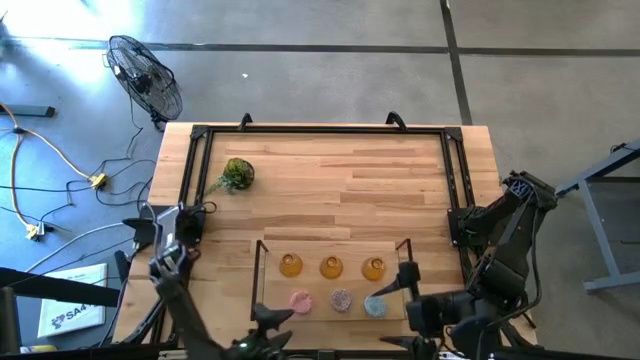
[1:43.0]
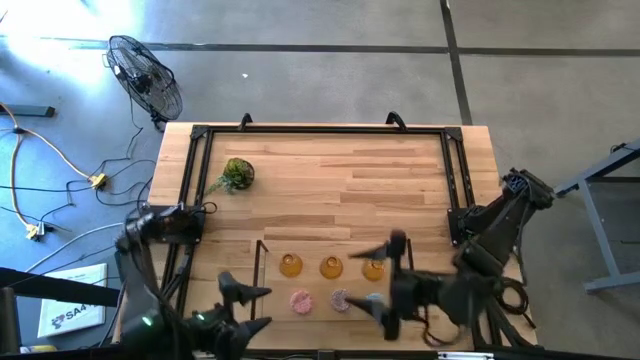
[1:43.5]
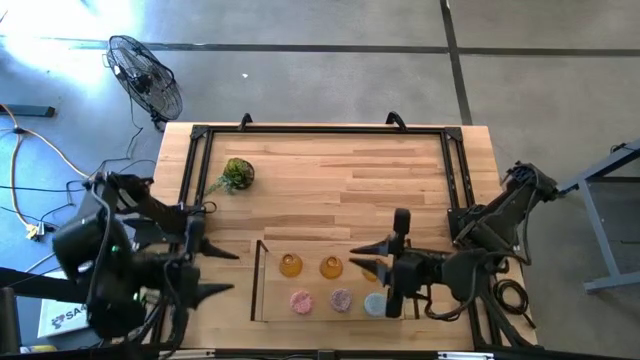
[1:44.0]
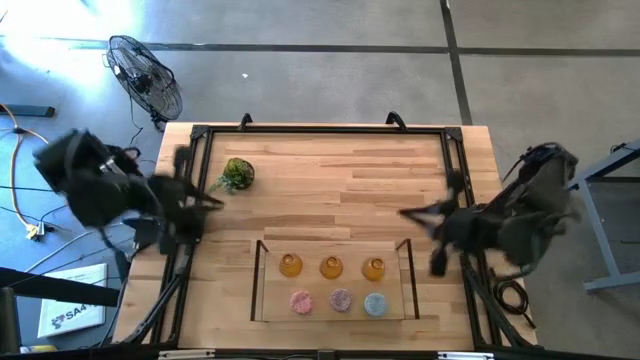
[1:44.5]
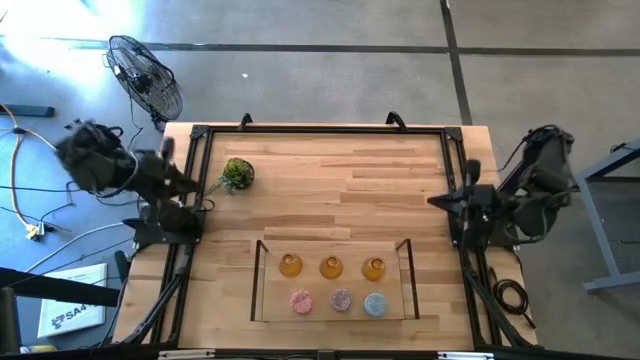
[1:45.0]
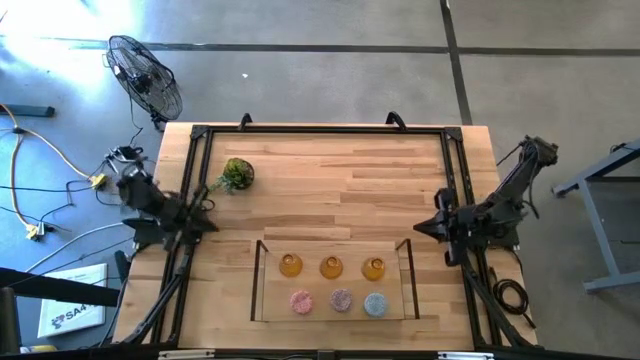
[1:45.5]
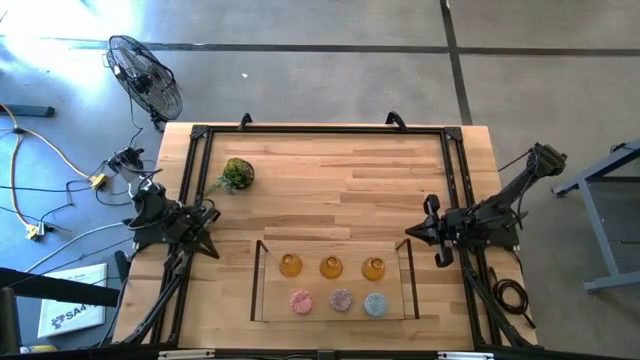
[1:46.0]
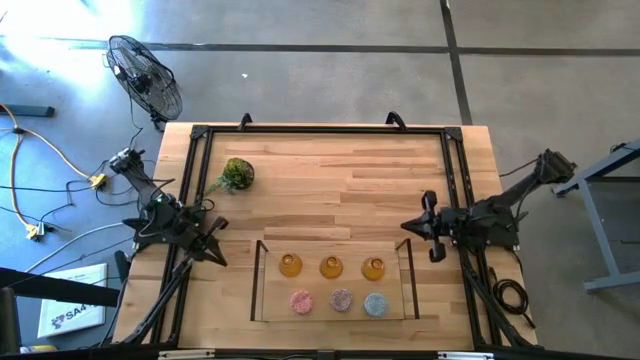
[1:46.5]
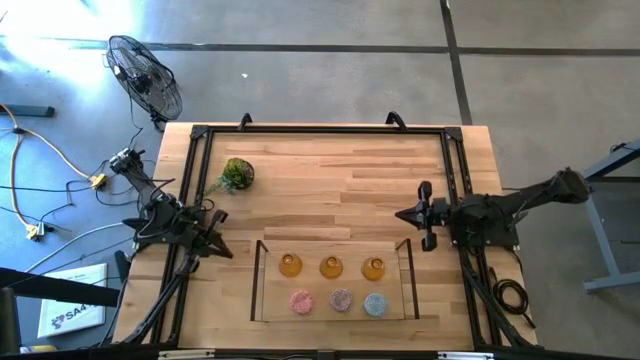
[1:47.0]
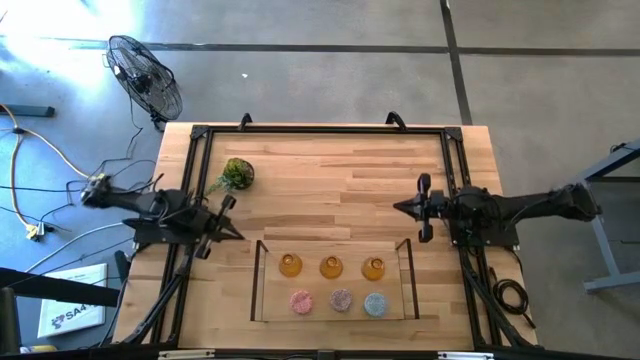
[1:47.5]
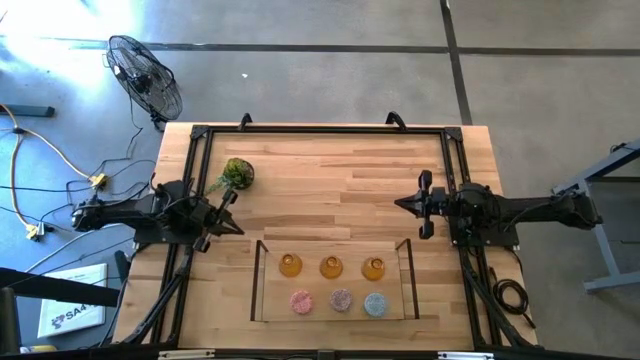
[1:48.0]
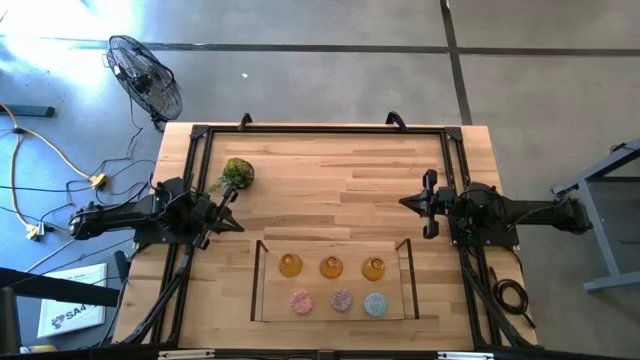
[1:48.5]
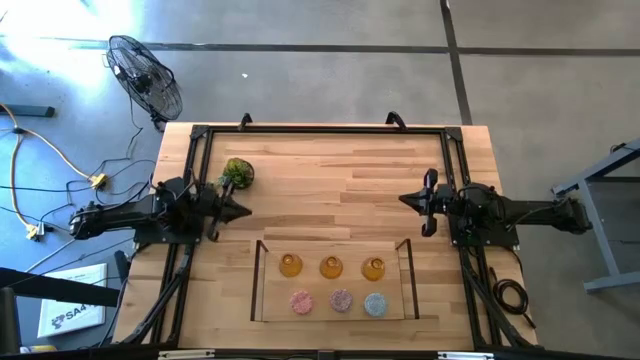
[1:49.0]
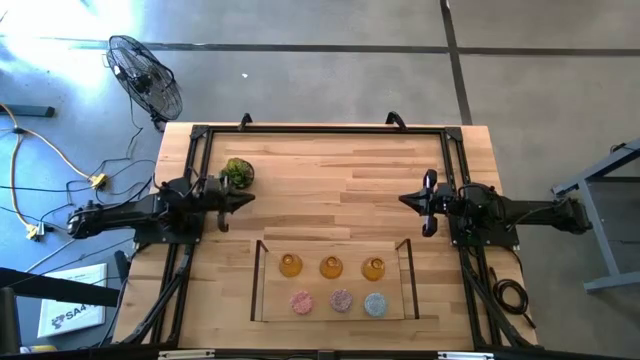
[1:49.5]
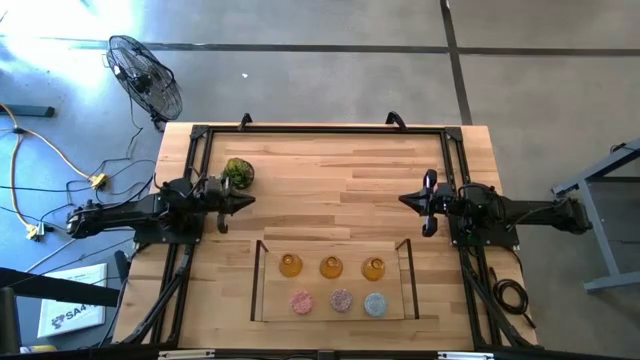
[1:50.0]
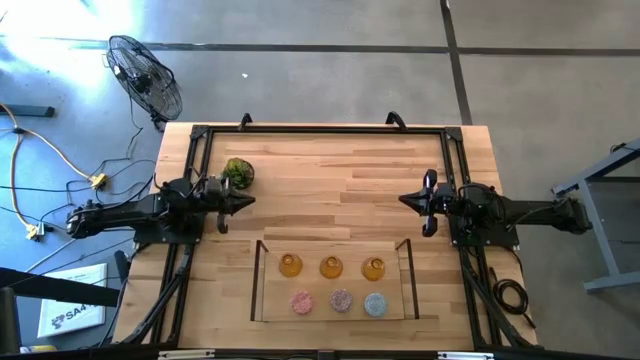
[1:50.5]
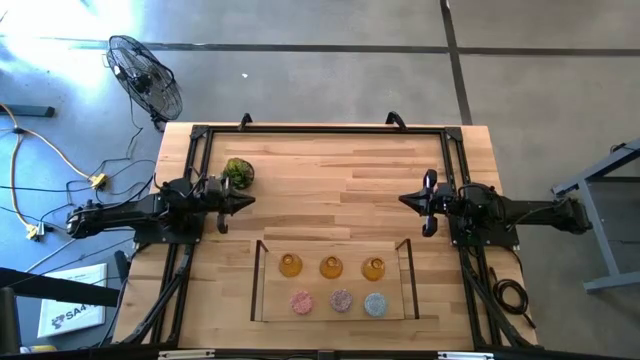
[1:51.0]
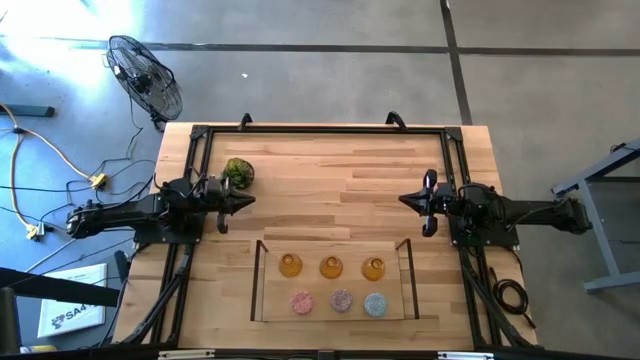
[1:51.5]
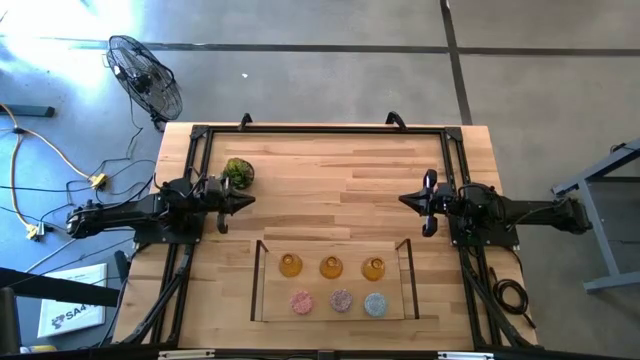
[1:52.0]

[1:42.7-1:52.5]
Task: Pick & Place candle stick holders
Return to Home Position

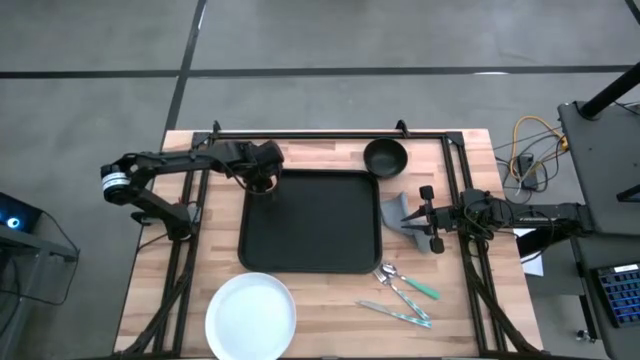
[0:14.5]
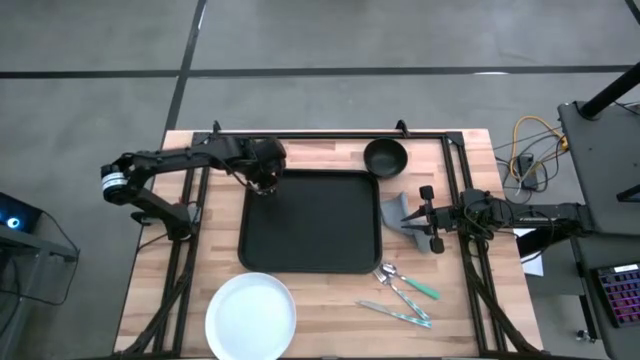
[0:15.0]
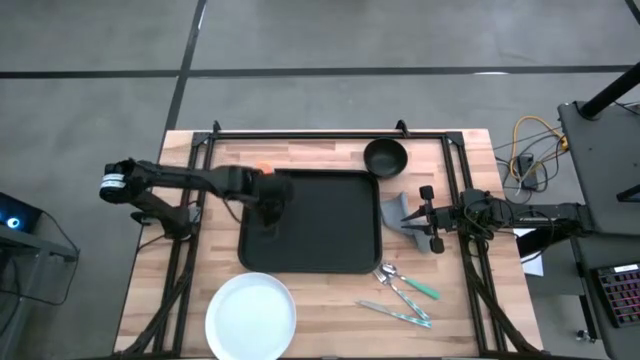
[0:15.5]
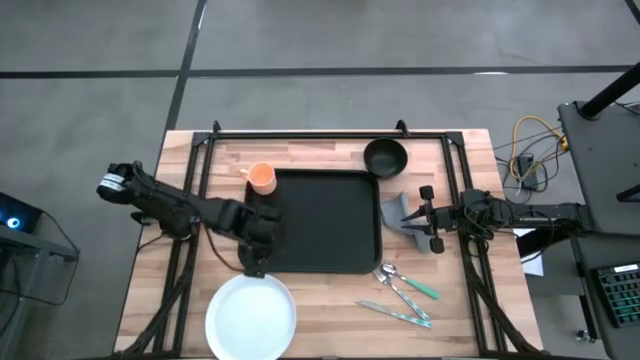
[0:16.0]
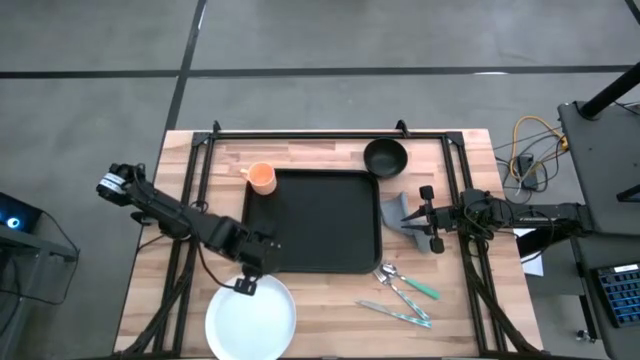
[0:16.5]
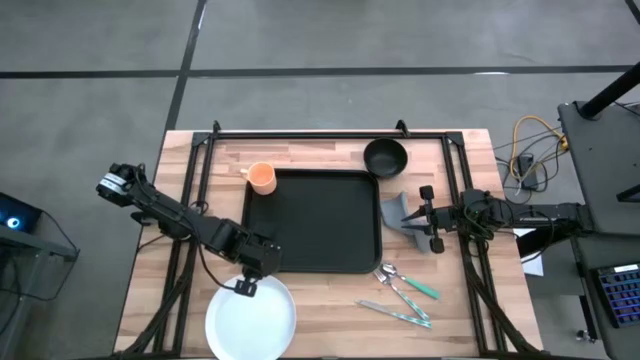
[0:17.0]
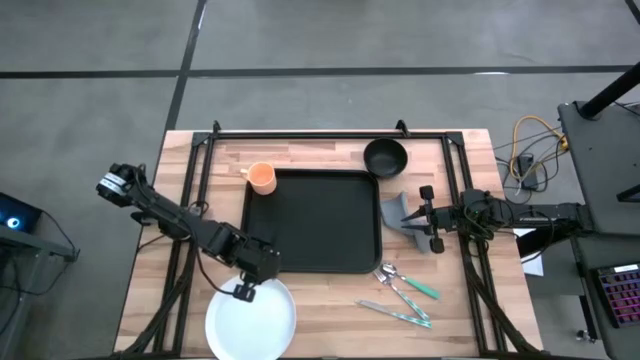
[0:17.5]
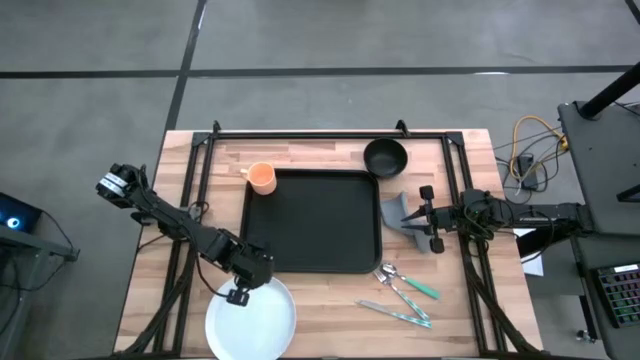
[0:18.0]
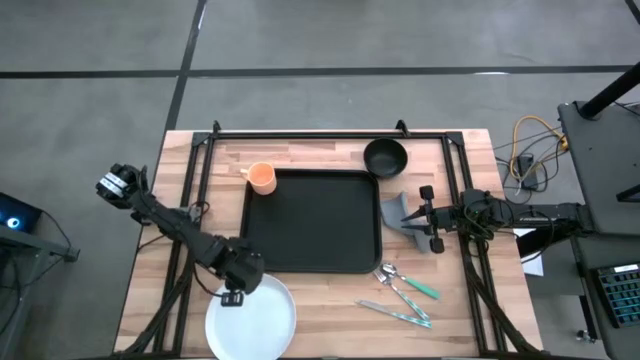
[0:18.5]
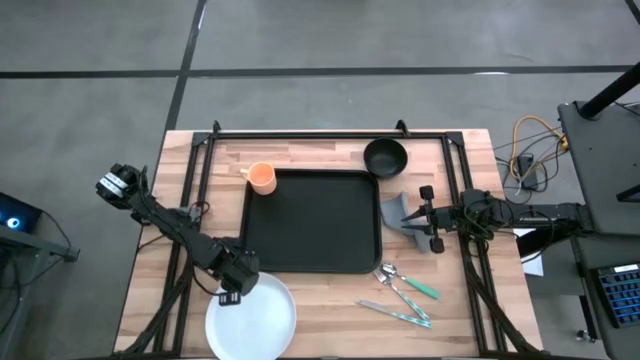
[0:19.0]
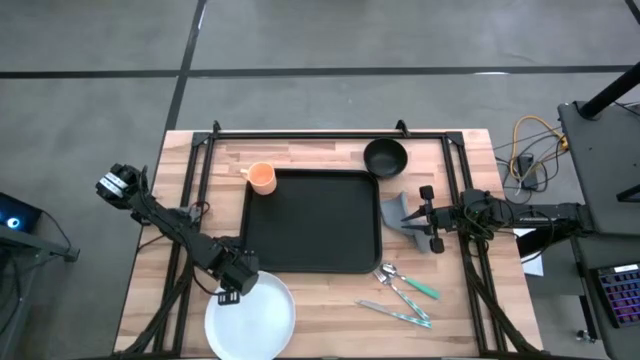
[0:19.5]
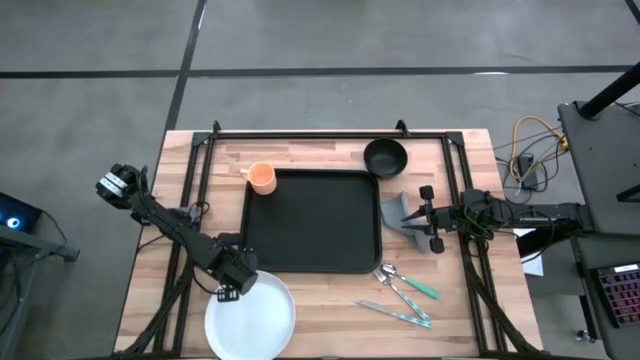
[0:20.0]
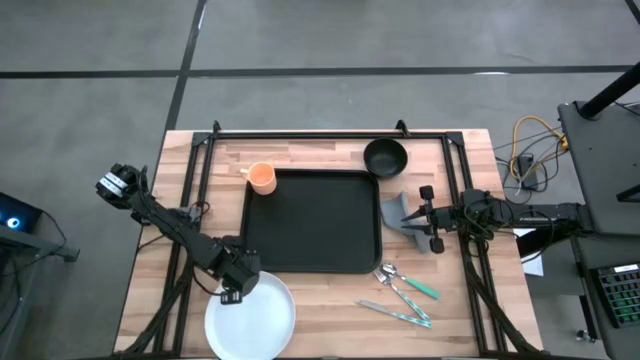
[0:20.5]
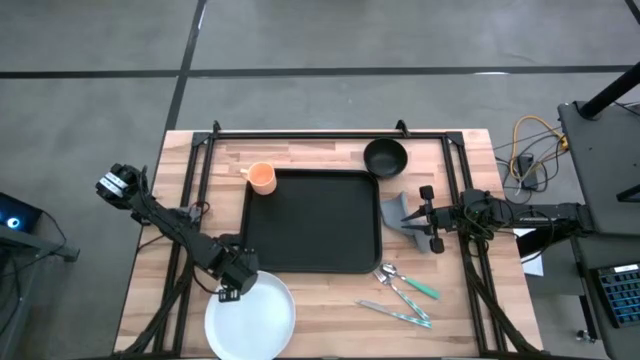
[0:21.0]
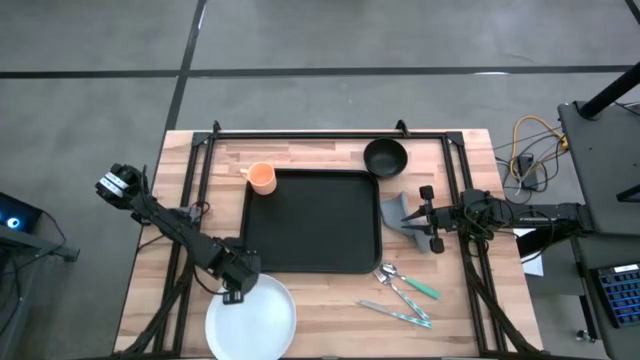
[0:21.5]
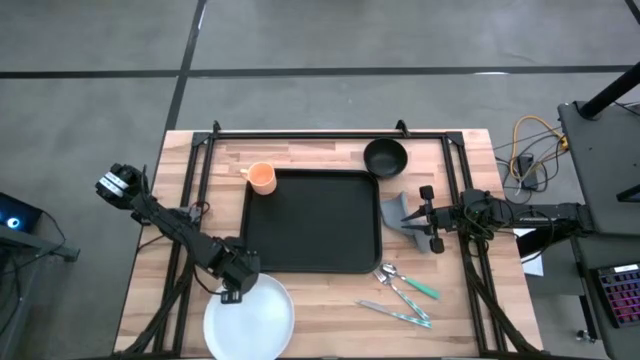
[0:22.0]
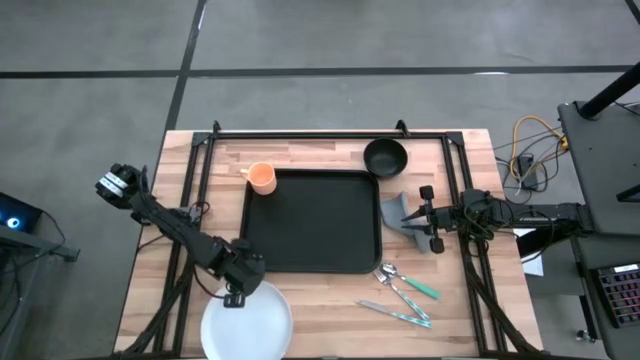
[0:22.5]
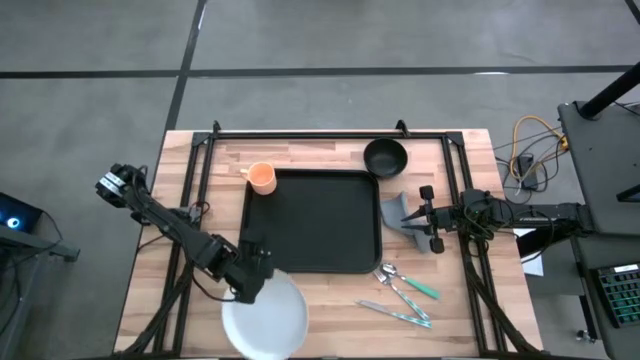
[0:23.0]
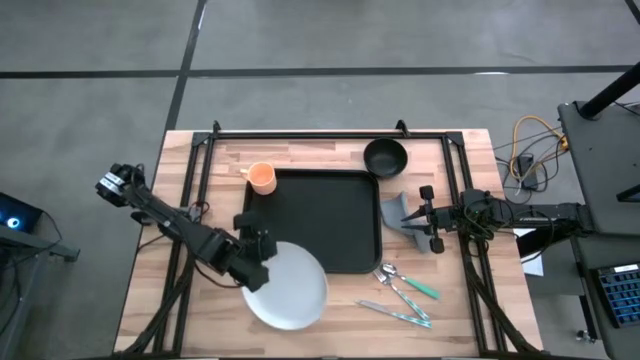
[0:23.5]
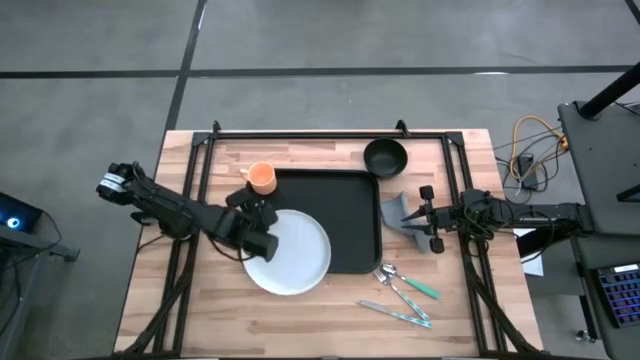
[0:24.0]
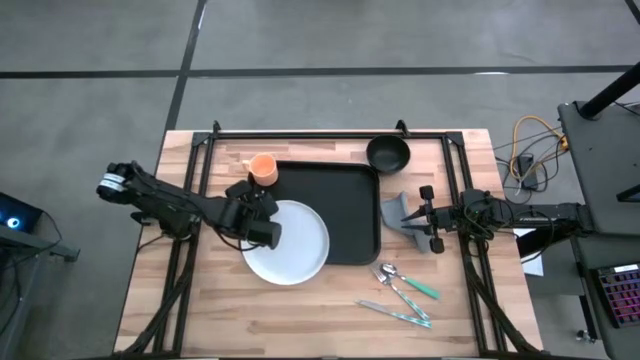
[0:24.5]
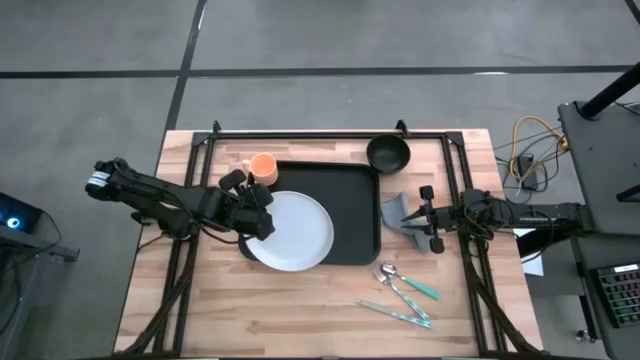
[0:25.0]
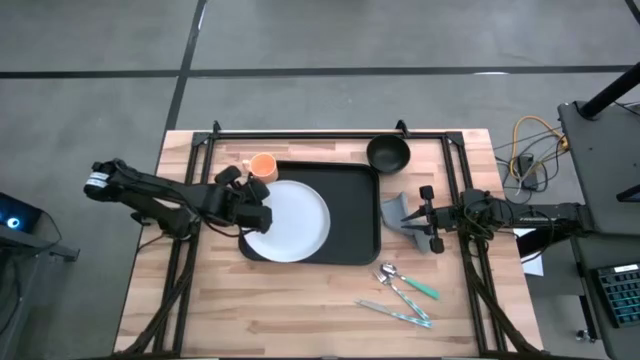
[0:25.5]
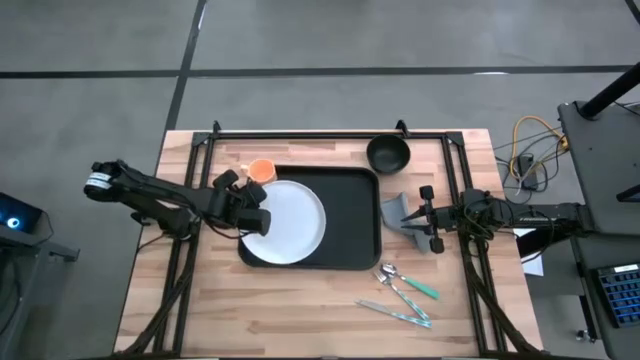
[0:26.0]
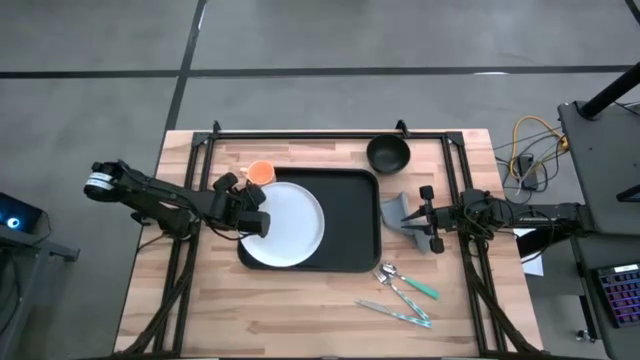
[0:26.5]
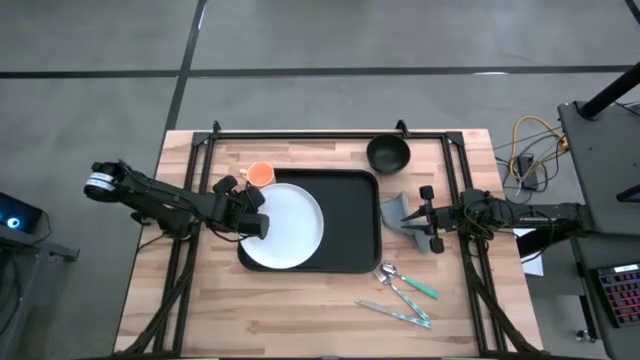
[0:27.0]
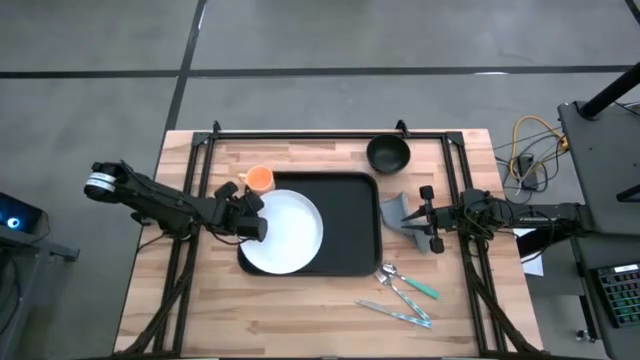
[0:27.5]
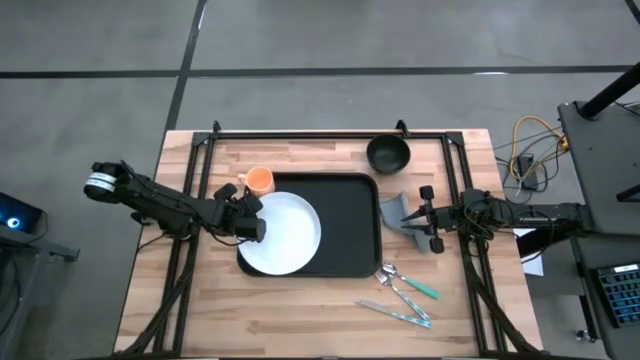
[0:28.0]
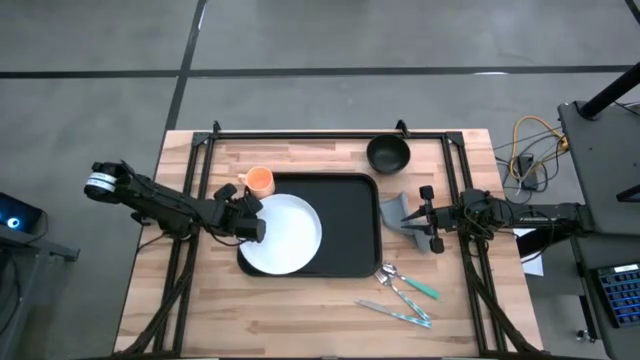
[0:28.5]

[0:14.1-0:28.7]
Task: Set up tray
Put the plate on the bottom left of the serving tray
